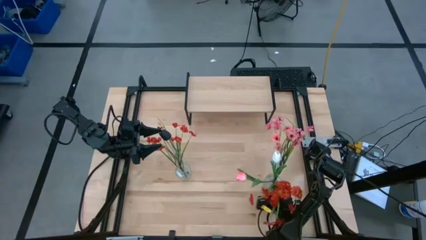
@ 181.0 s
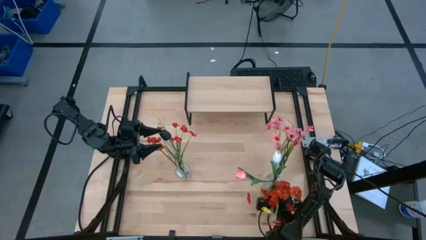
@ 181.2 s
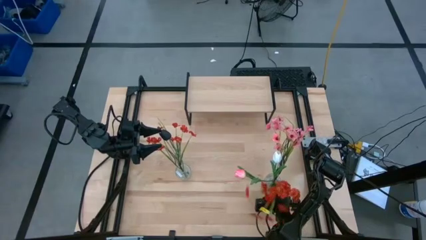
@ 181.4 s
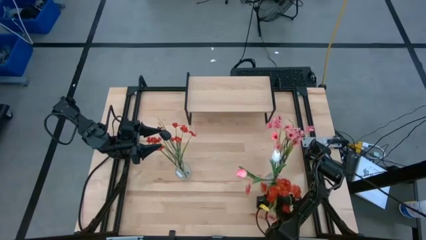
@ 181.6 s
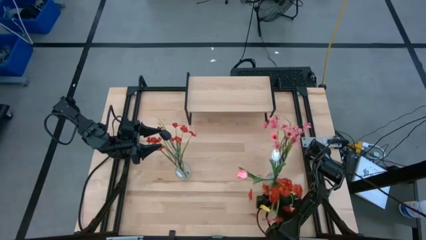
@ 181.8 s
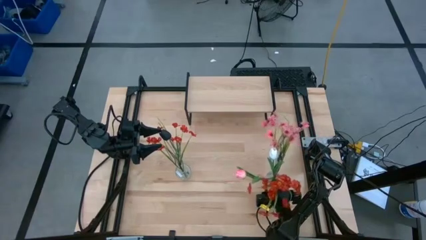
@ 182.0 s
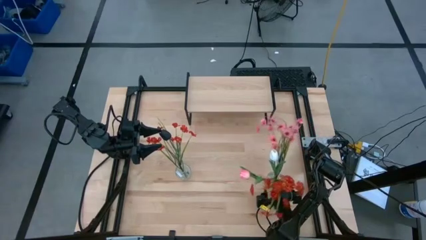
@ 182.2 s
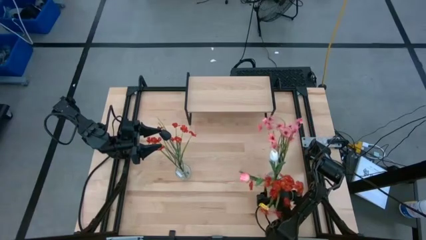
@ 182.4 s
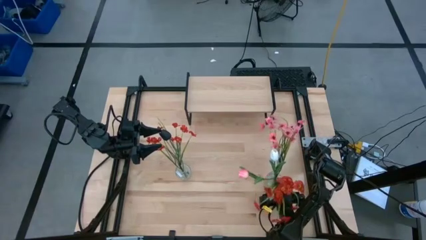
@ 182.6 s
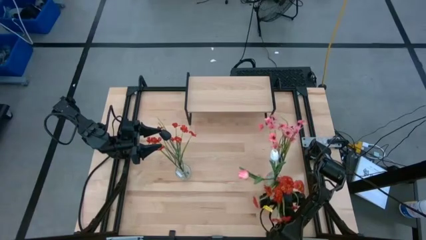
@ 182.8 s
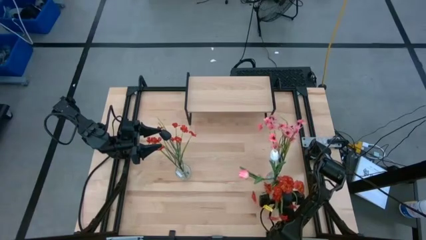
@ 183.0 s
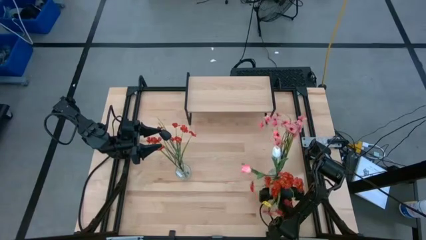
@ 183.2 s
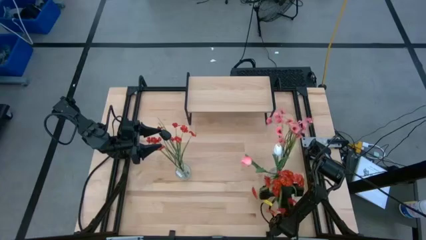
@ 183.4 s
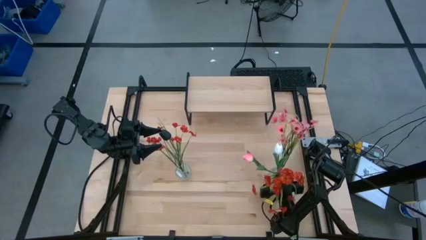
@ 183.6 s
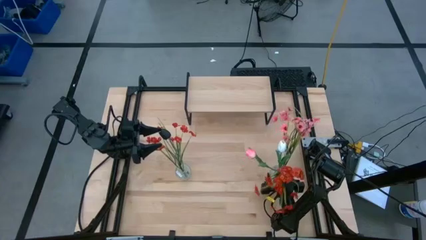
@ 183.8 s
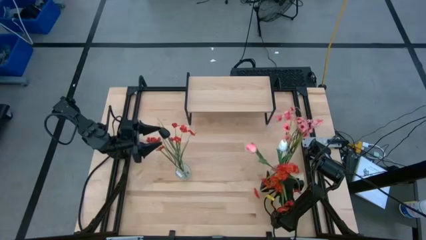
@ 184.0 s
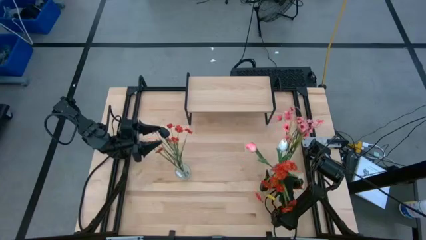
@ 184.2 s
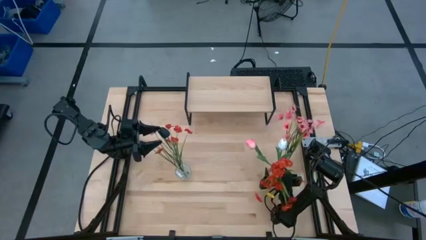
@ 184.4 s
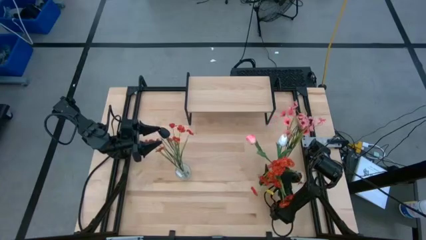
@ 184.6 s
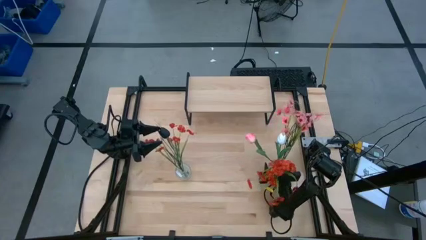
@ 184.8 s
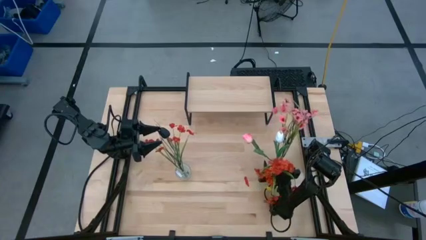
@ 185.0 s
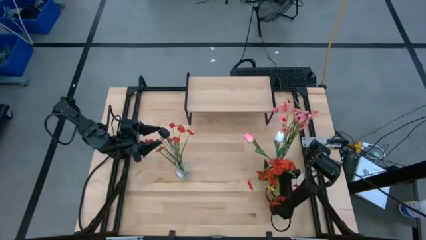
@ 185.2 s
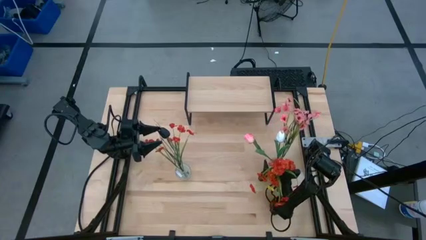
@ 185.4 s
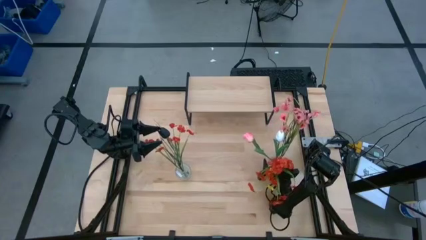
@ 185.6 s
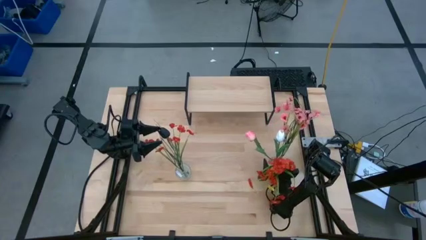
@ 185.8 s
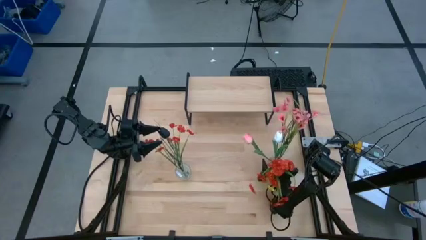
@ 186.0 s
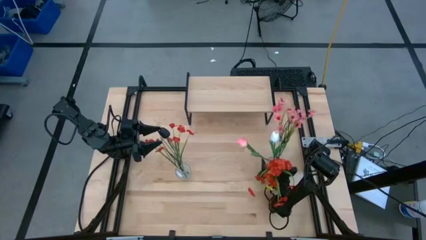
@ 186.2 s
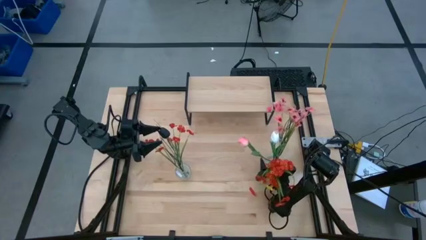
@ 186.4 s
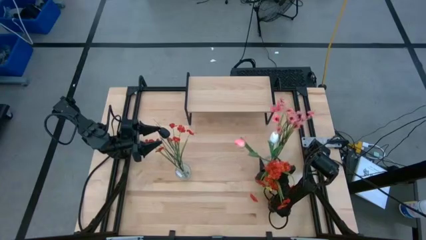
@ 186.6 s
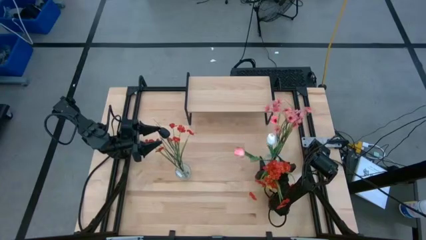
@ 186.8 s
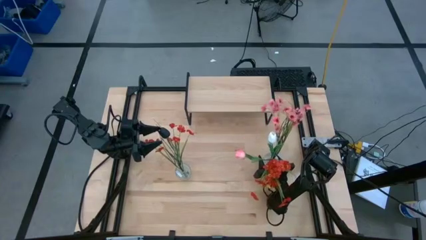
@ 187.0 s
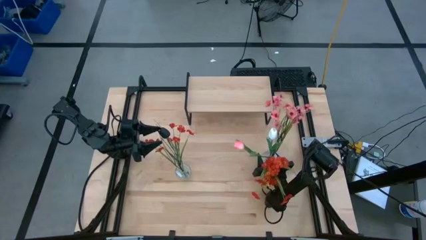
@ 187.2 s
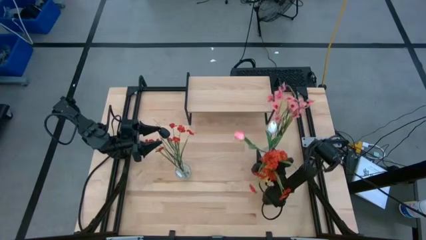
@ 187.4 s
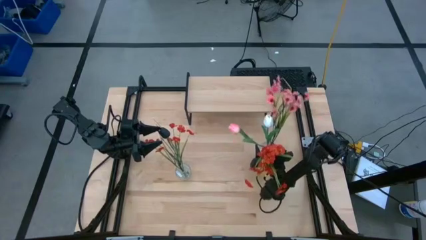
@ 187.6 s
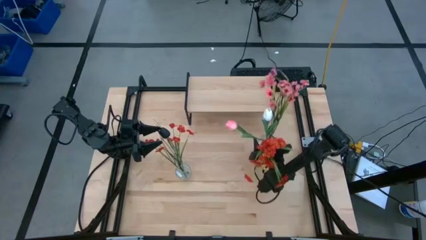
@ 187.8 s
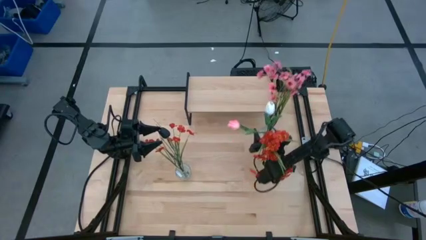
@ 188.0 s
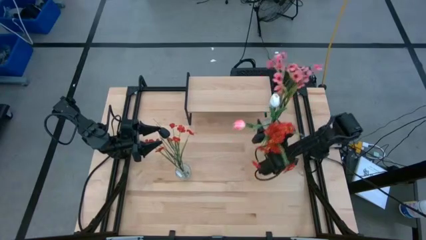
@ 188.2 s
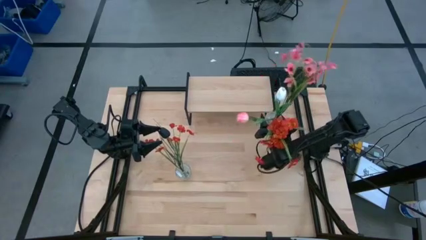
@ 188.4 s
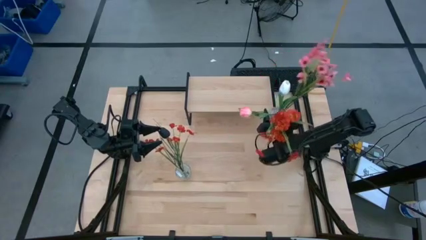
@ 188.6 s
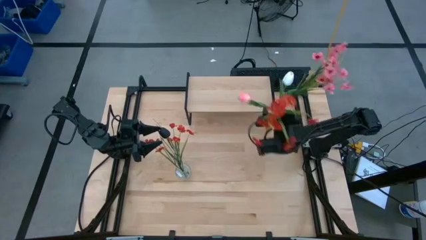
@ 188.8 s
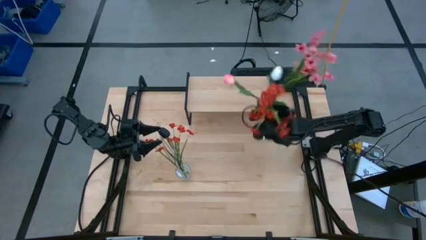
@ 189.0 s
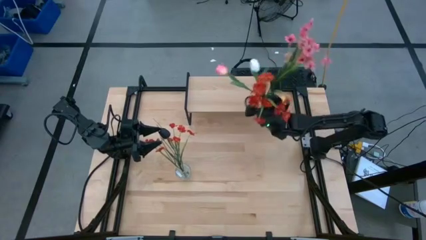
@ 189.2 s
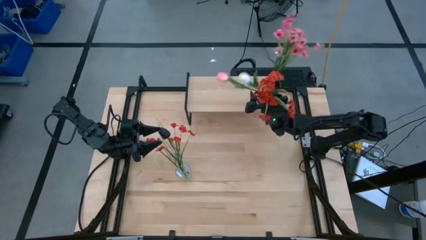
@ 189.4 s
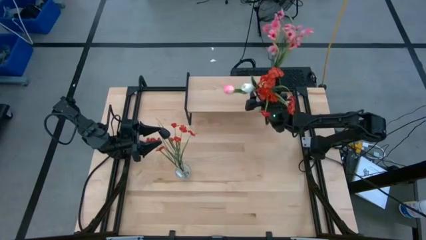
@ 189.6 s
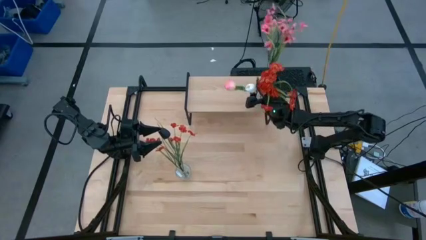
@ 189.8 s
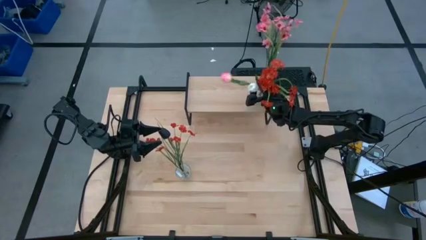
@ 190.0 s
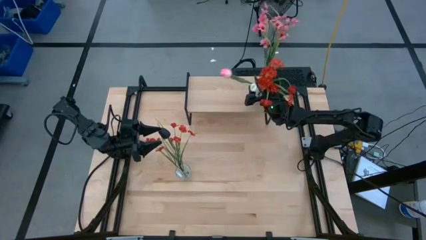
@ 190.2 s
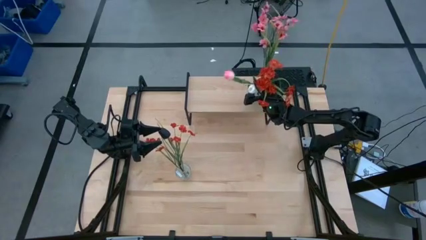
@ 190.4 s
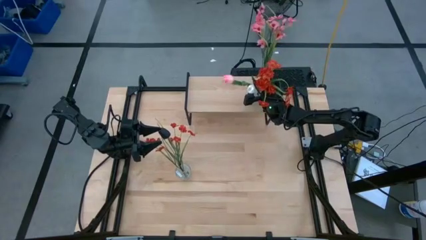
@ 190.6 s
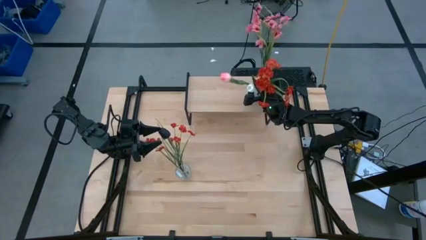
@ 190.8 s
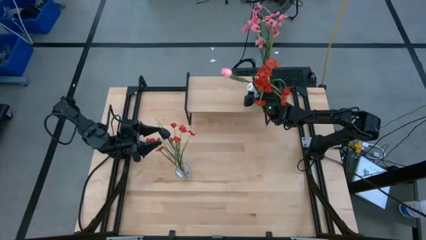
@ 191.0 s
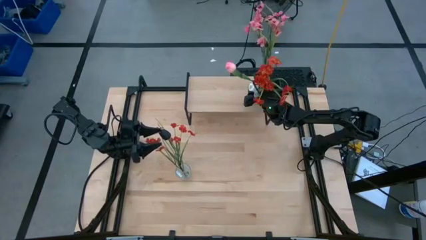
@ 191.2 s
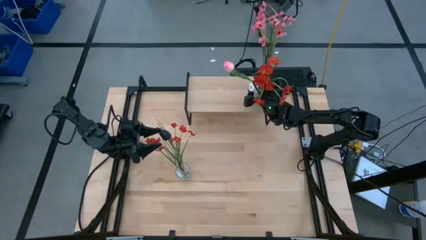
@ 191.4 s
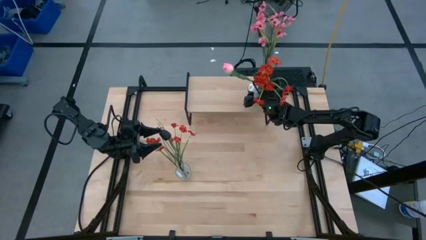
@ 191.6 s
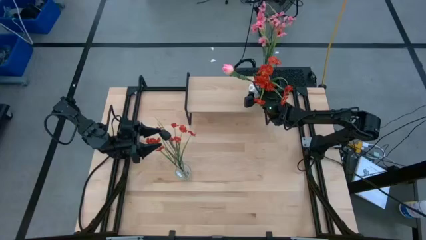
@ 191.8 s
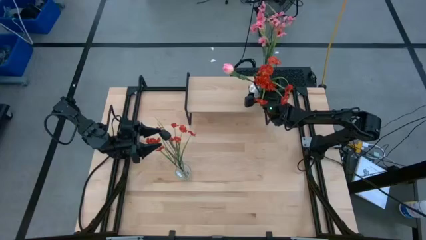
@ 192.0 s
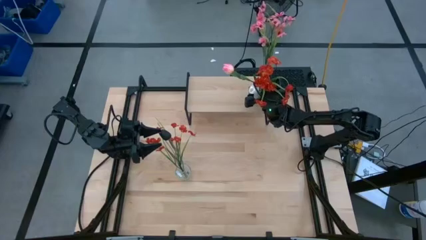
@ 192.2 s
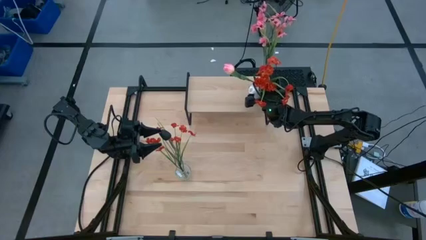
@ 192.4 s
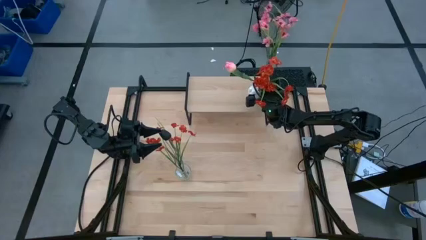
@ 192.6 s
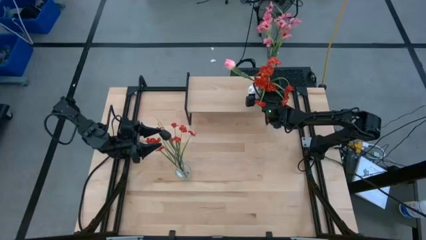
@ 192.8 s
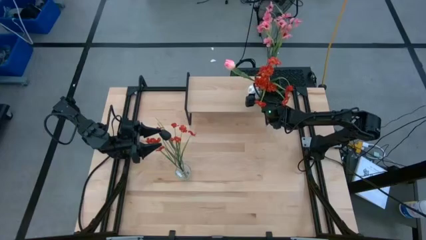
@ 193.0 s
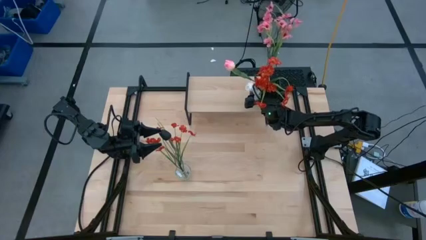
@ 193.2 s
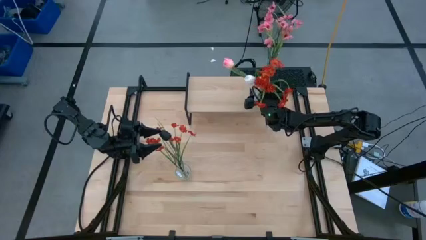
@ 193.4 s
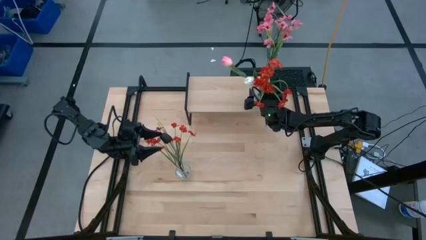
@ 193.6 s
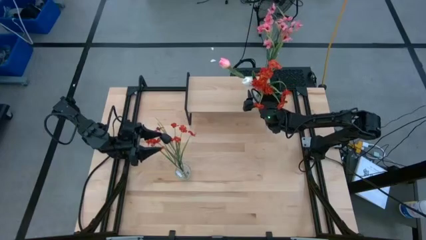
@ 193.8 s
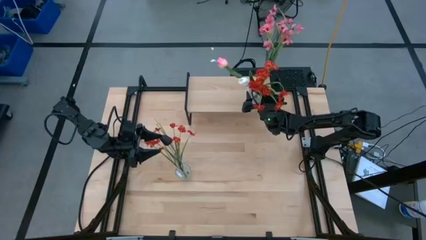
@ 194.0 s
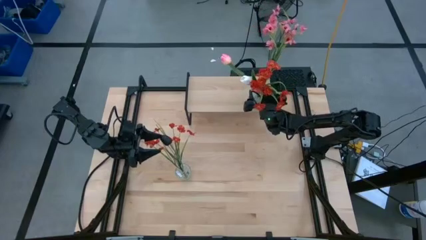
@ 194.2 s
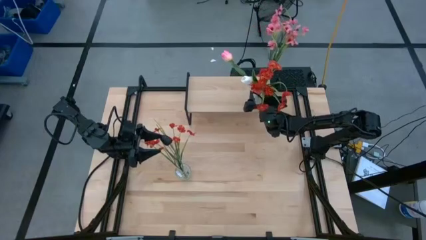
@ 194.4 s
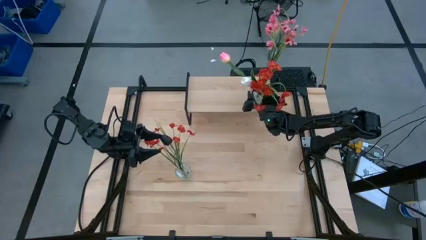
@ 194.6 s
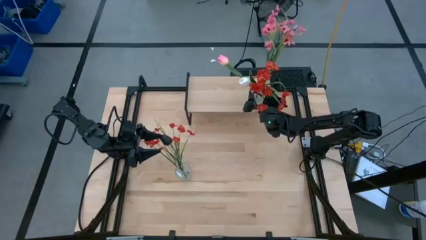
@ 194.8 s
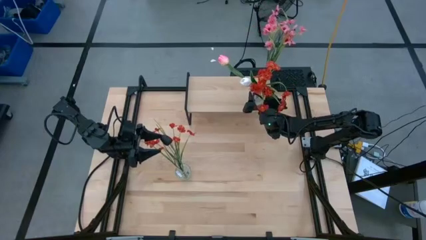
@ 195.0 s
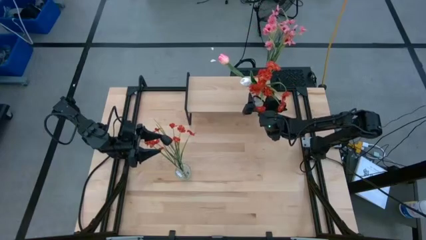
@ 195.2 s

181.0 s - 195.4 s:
Task: Pick and place flowers into a vace then onto a shelf
Put the right transparent vase with flowers on the shelf
